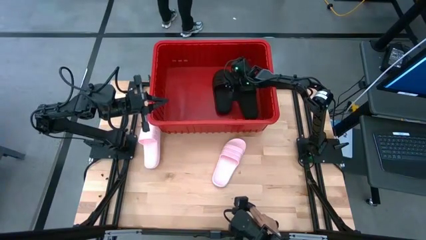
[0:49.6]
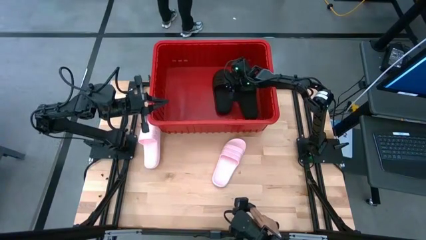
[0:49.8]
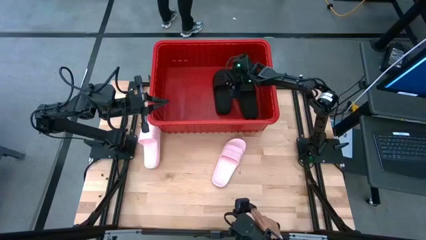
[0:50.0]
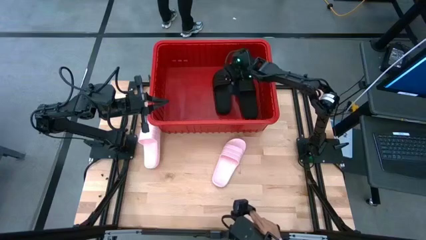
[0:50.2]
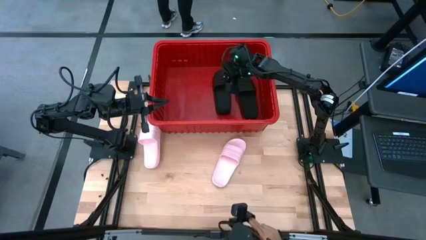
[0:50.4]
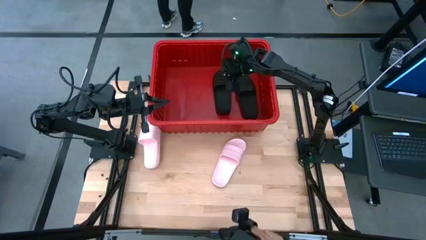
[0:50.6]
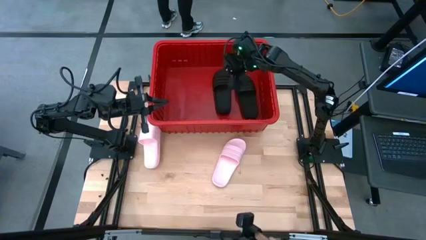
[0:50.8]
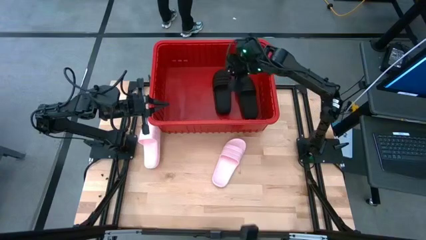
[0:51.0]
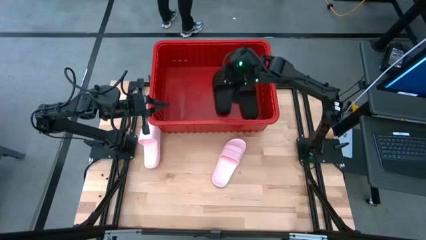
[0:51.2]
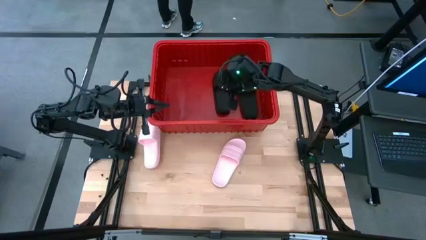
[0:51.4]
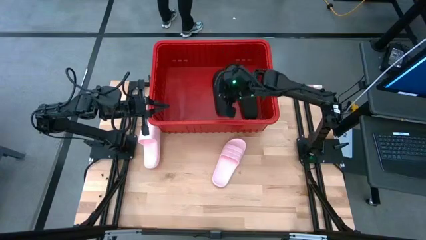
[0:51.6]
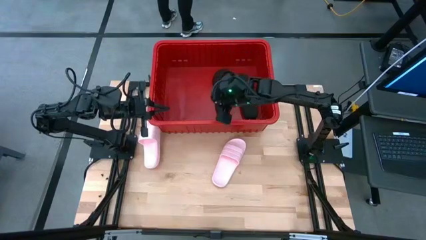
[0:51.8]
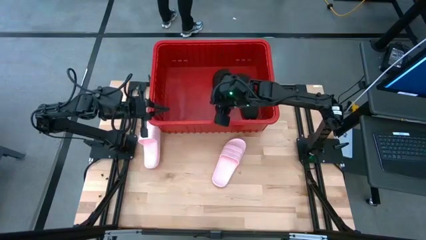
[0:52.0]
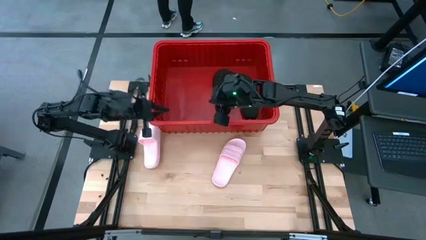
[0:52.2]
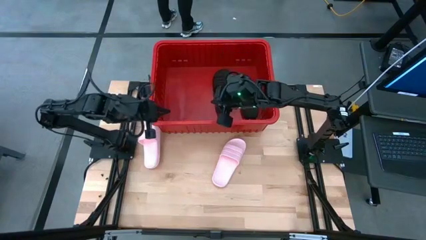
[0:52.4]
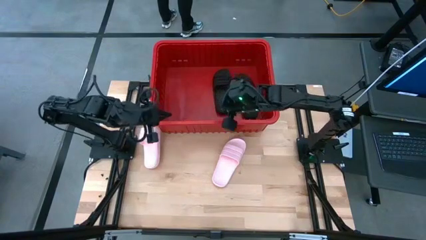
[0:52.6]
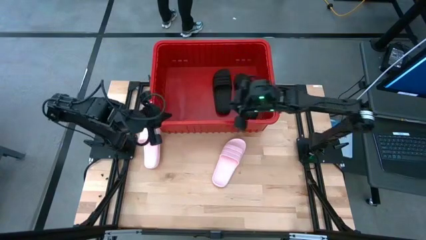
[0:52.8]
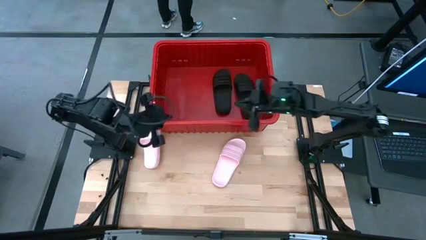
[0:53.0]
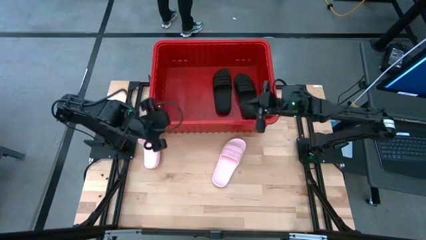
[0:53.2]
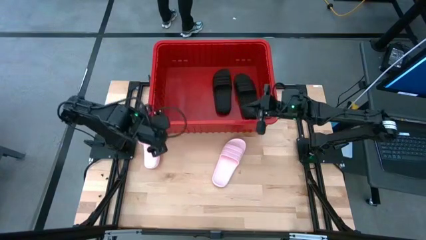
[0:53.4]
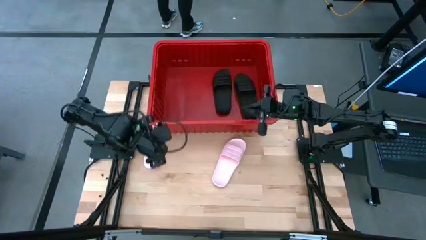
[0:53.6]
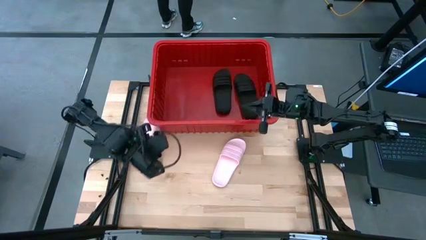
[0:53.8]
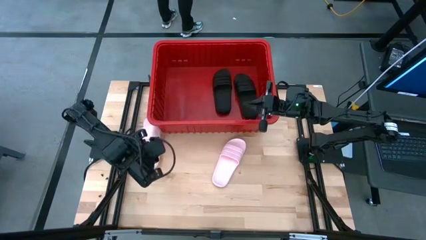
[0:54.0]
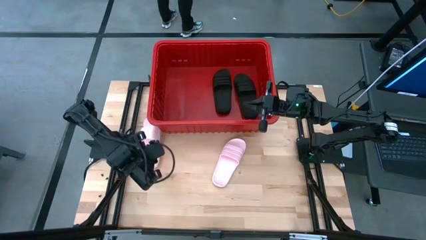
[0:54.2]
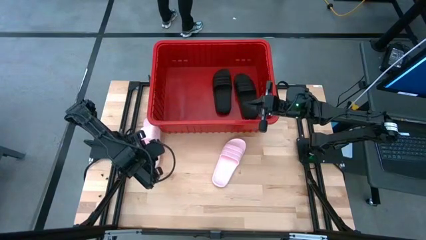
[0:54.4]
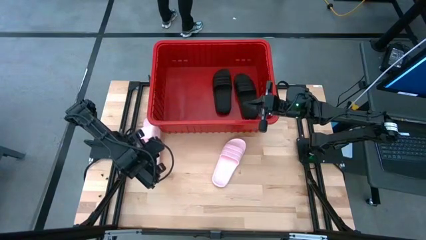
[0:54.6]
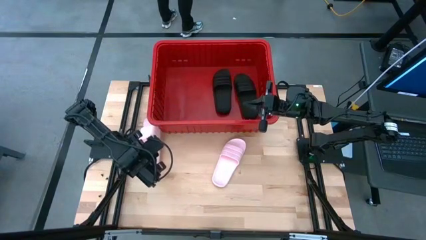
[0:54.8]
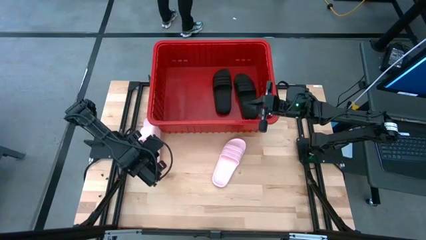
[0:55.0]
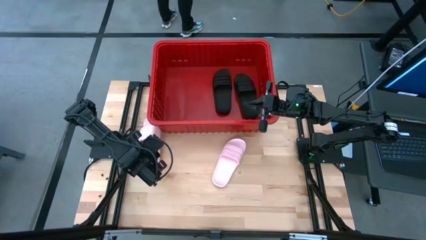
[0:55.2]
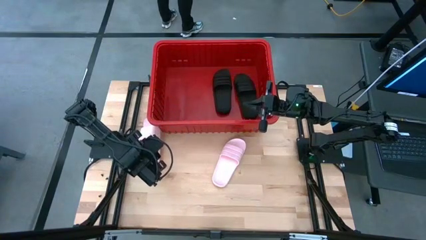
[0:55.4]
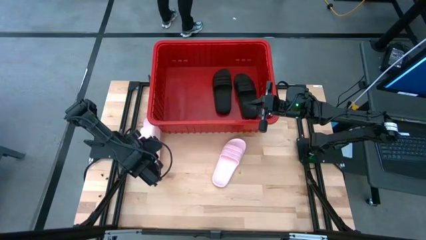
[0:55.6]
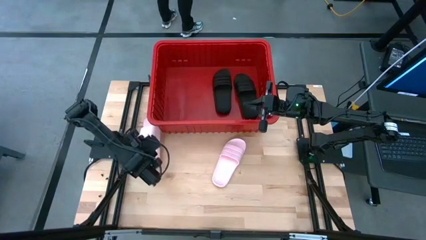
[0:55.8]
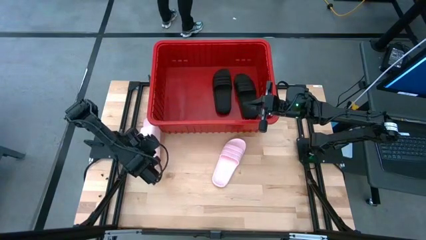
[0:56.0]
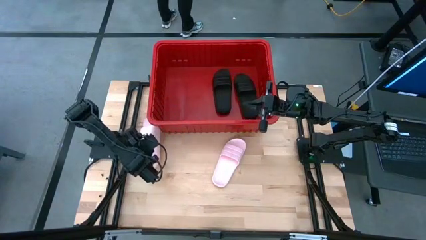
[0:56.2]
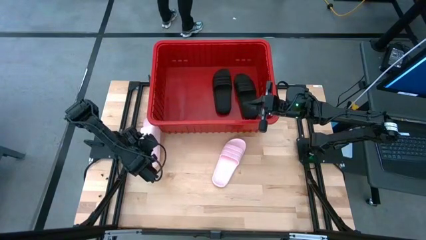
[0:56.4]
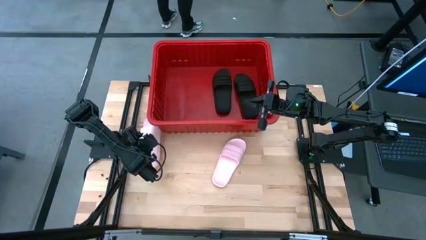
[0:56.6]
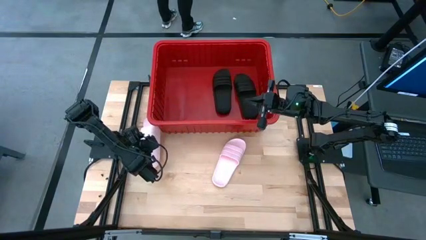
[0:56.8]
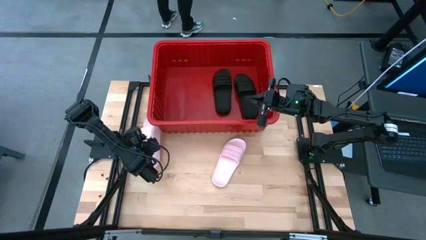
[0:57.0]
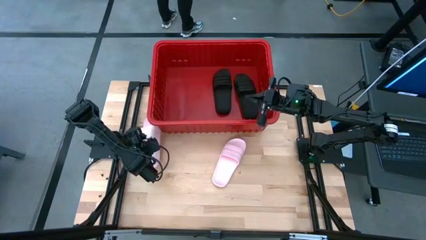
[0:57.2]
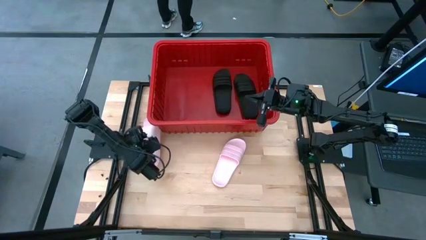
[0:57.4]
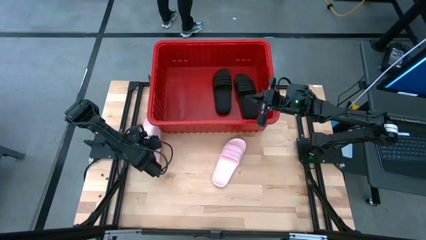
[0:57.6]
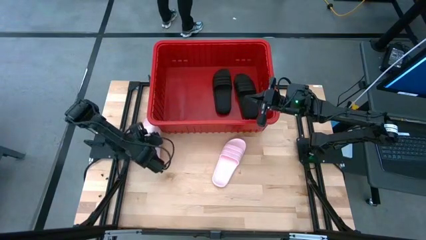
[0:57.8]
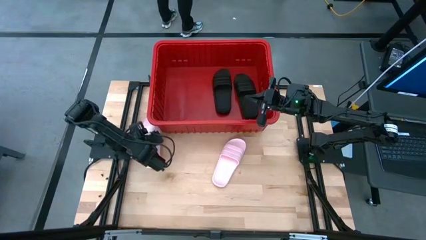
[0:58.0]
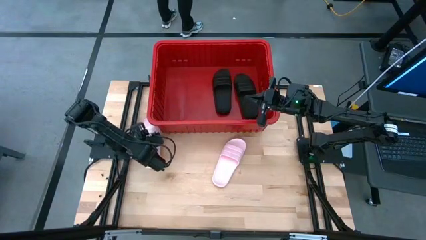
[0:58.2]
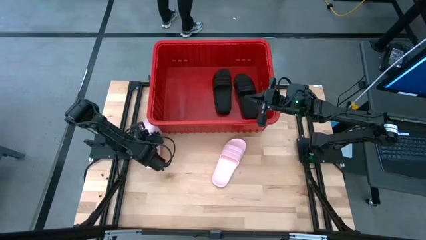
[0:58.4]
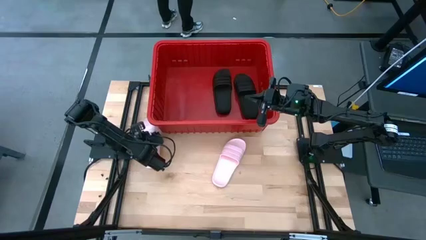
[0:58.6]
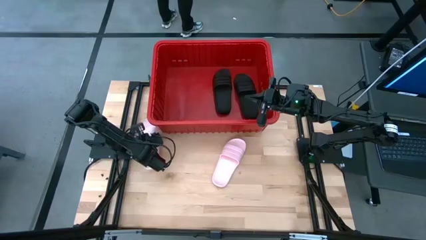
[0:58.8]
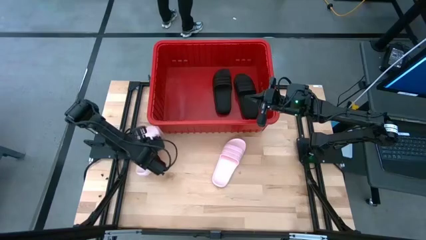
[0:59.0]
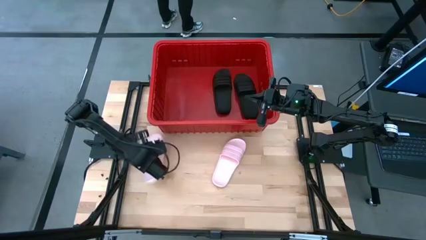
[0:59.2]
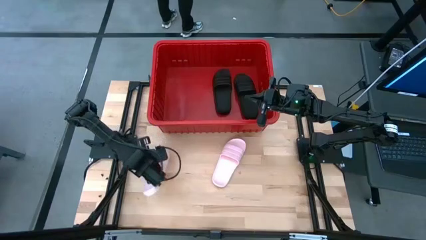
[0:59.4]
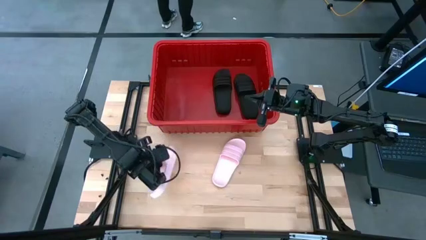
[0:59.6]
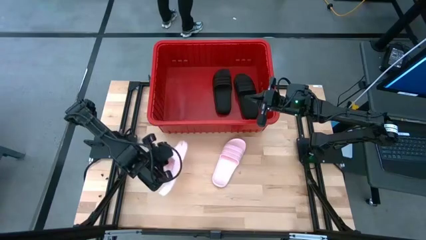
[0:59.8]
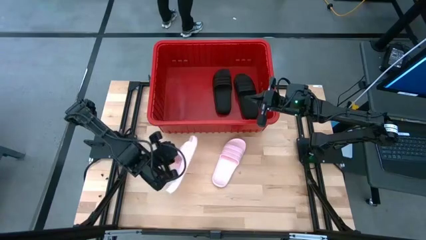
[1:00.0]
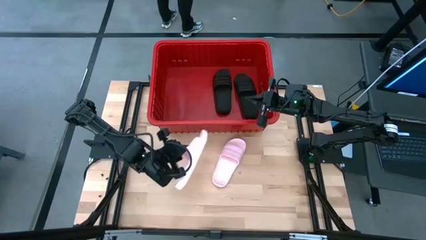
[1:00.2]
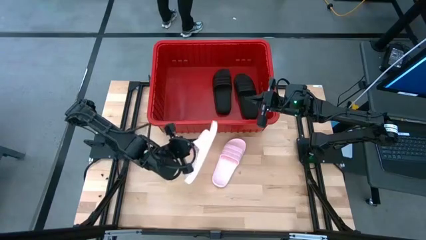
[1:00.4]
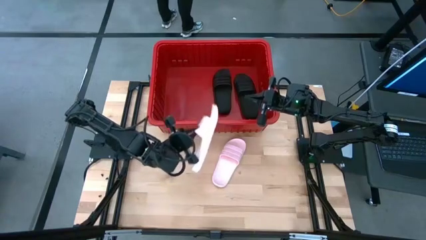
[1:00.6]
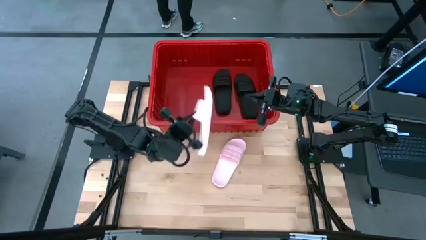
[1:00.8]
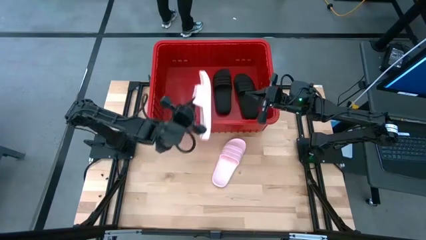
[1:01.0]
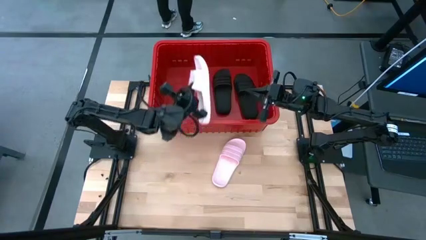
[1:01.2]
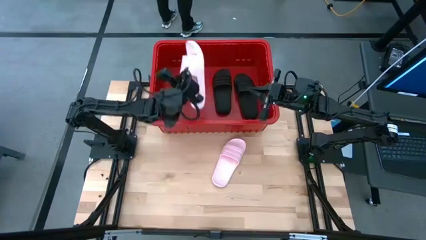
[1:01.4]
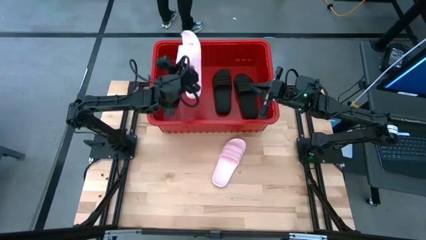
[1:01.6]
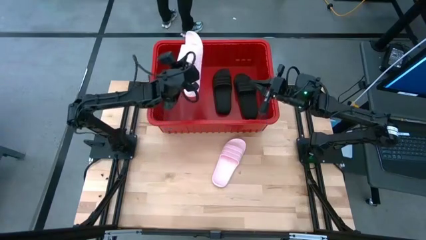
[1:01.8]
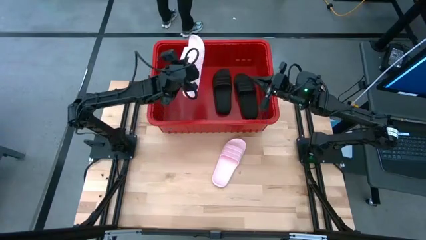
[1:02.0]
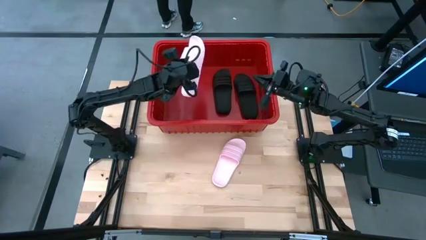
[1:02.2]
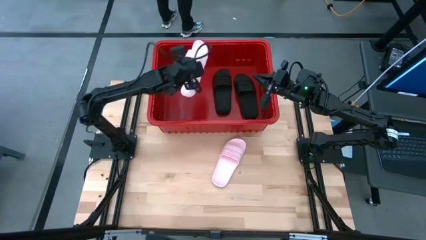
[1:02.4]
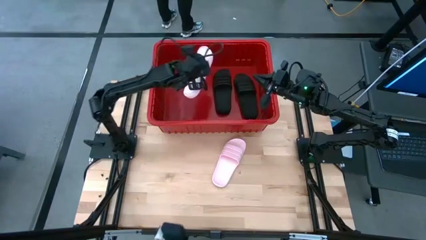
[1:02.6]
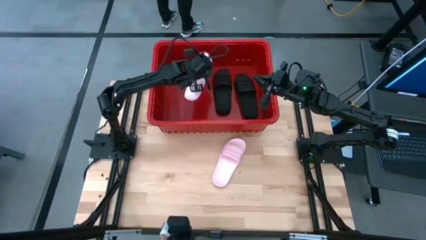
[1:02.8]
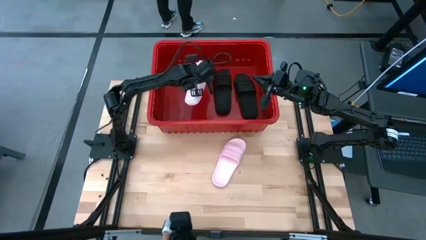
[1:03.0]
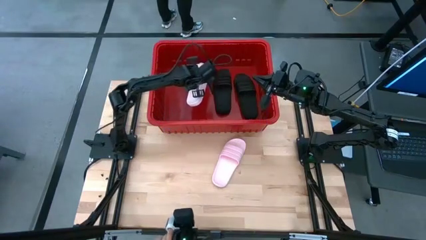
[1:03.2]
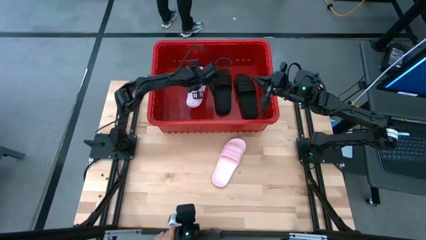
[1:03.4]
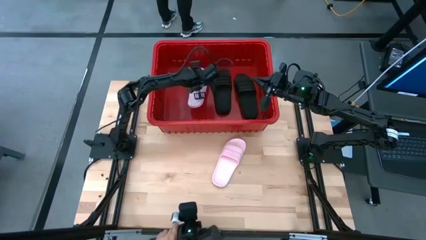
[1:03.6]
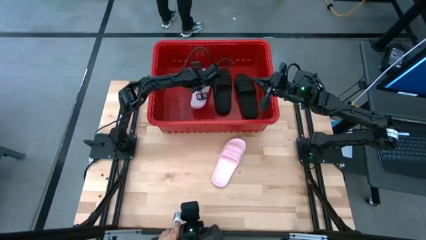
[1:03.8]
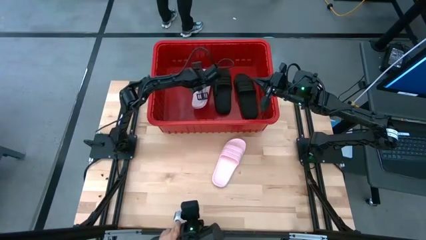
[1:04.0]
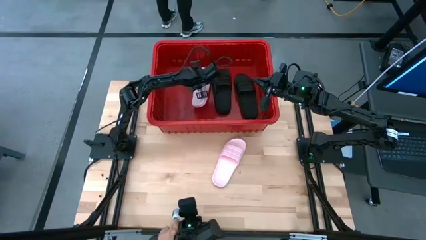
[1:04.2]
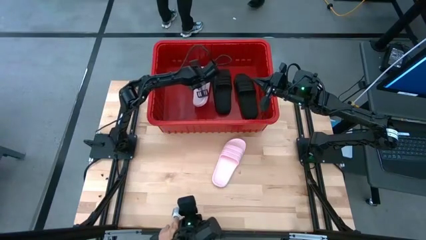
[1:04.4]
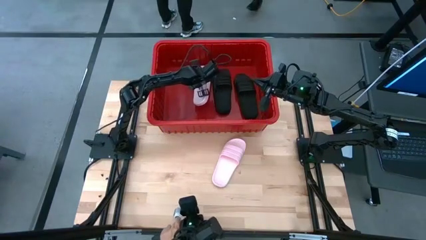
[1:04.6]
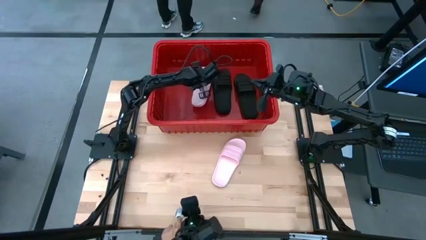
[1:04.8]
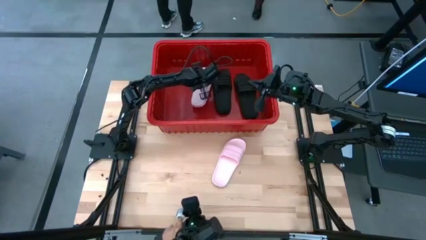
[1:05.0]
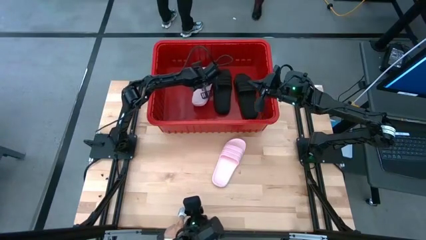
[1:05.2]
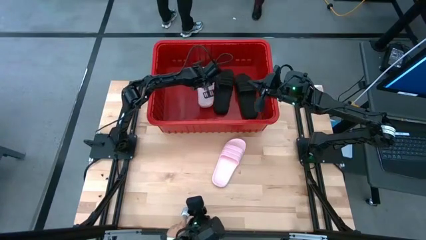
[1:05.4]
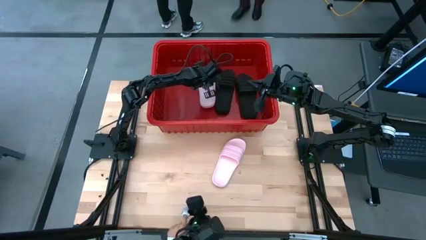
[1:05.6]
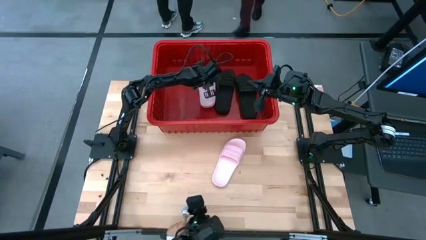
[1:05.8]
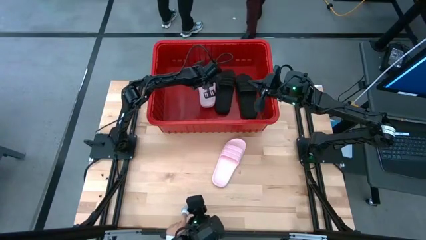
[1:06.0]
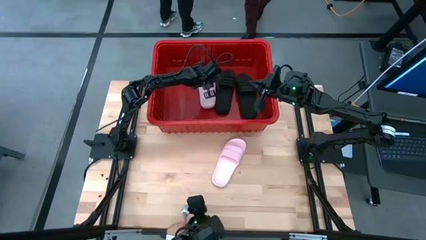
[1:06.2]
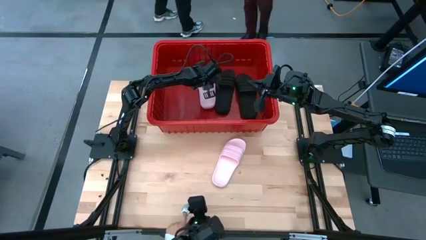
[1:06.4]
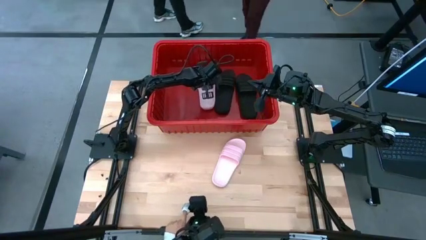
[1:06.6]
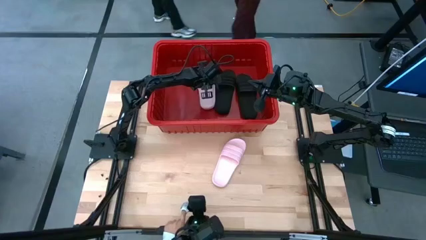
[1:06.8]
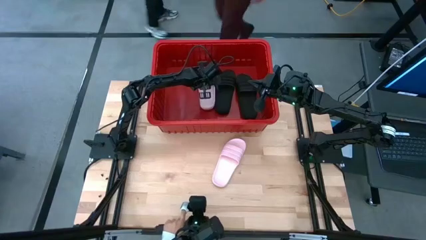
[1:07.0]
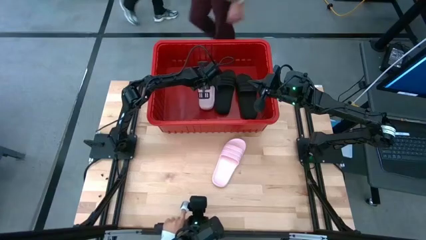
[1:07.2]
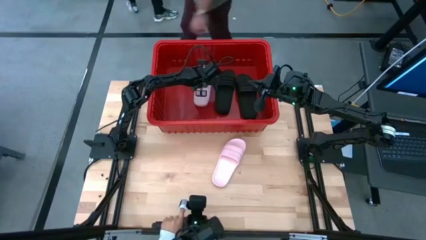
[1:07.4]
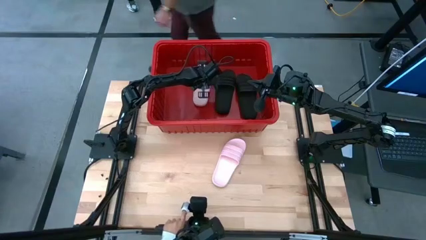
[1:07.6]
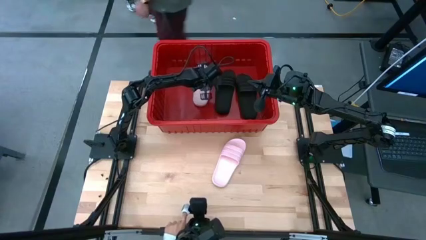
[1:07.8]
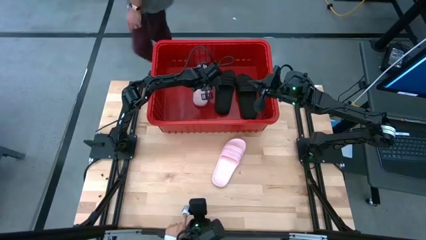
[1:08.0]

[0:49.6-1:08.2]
Task: Pick and place slides into bin
Put the left pink slide into the bin
